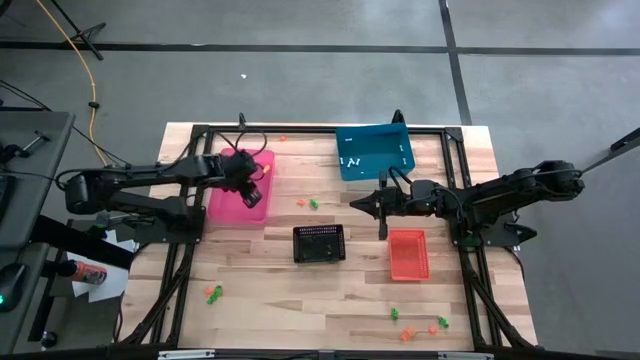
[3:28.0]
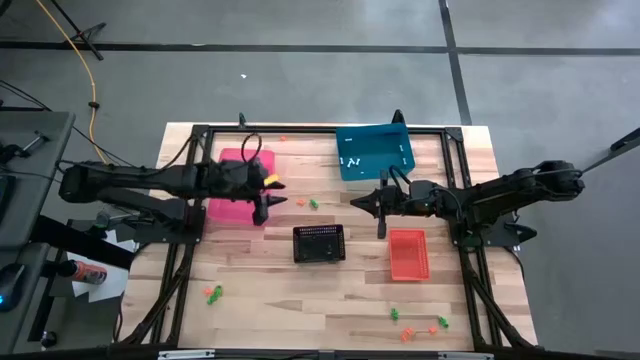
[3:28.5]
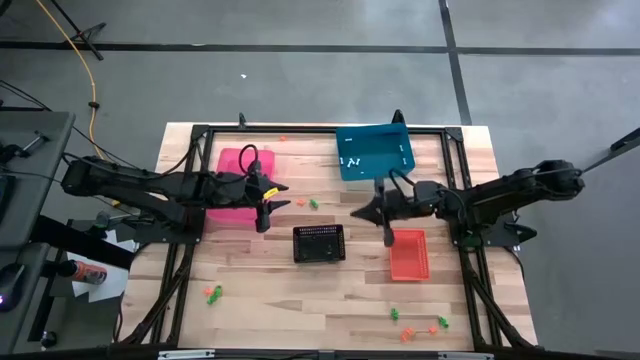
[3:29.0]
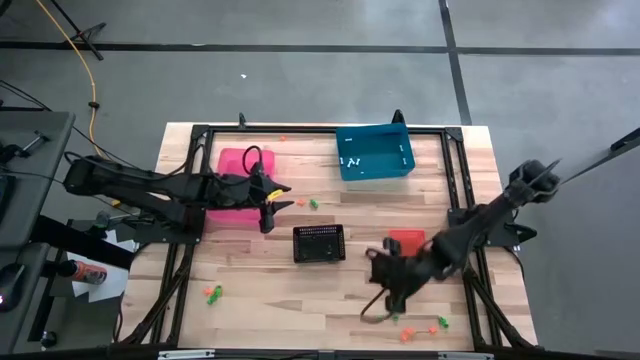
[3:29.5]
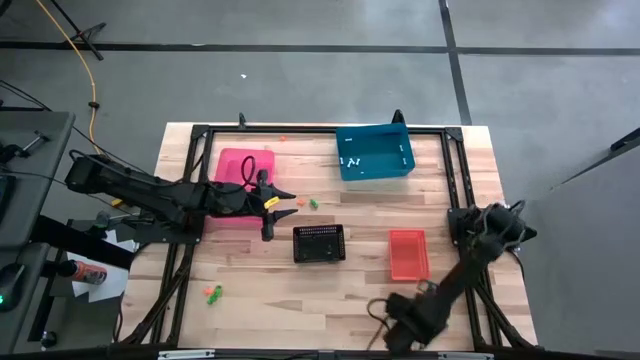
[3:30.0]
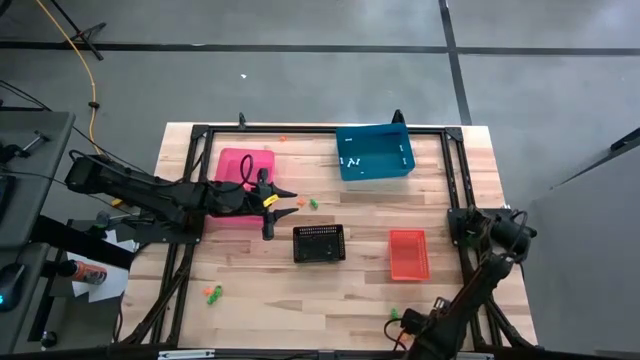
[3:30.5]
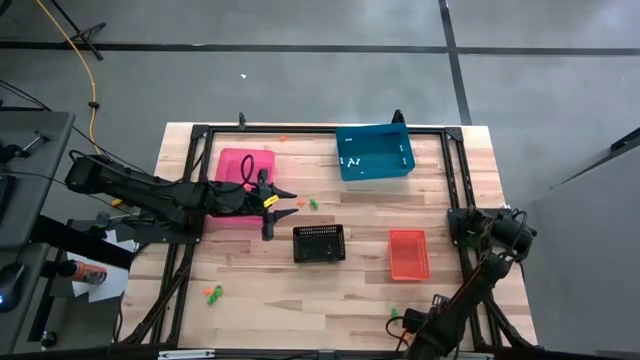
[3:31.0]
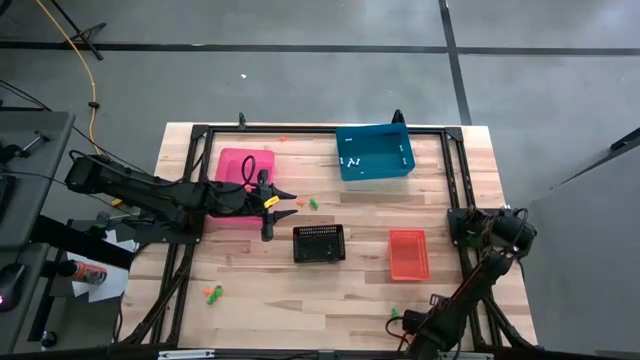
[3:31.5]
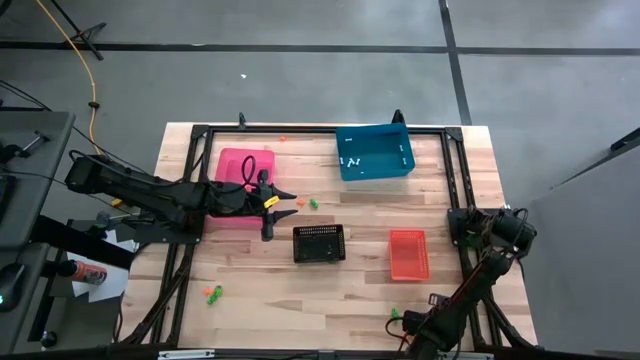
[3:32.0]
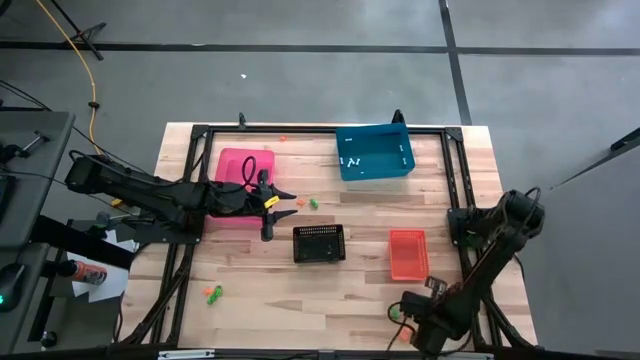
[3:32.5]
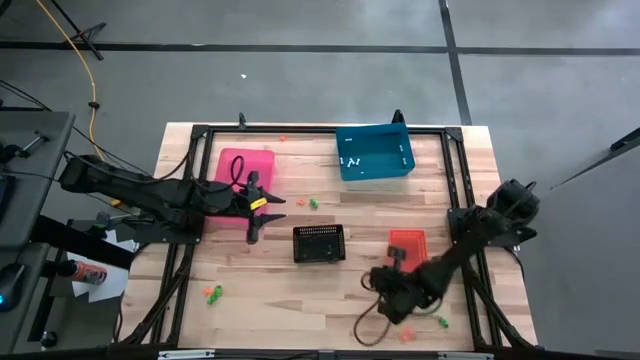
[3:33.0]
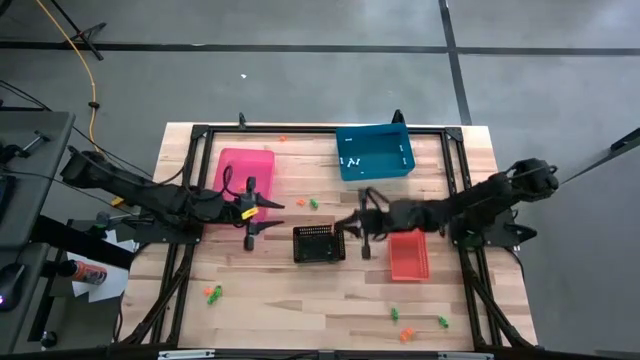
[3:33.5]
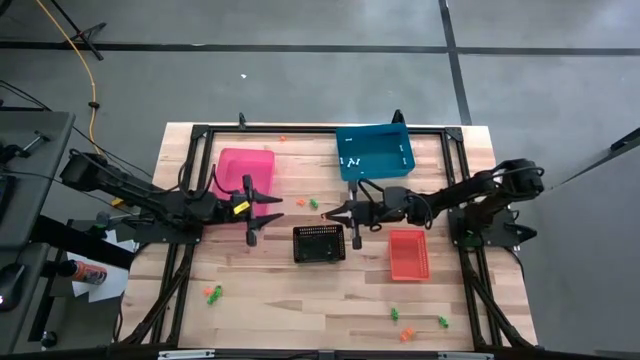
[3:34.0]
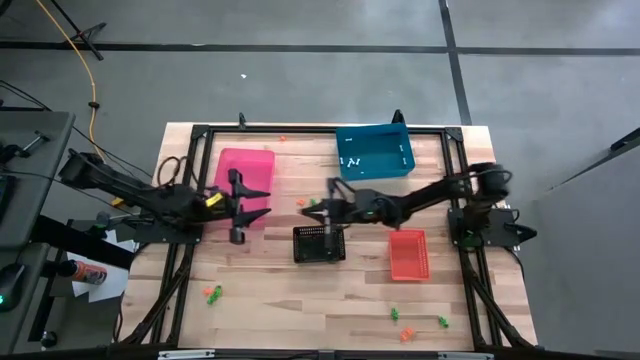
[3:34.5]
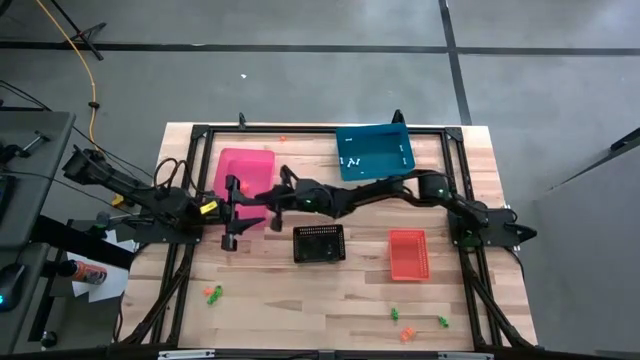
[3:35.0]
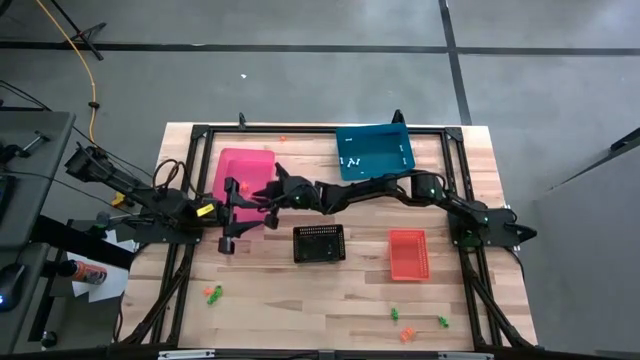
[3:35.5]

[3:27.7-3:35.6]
Task: Sort Halloween decoration
Put the orange spider toy into the pink bin

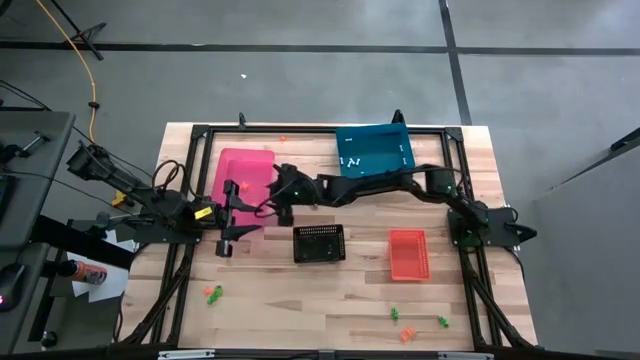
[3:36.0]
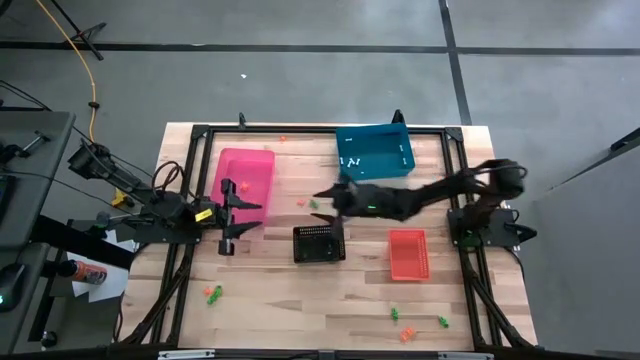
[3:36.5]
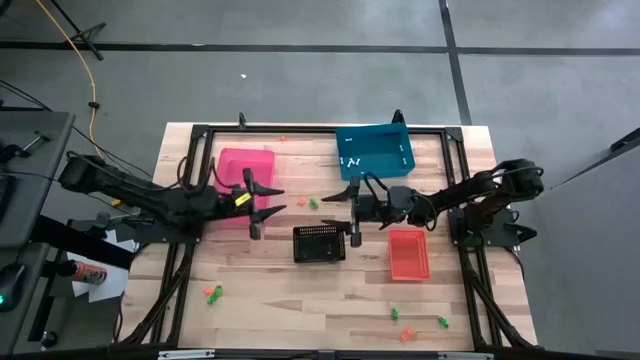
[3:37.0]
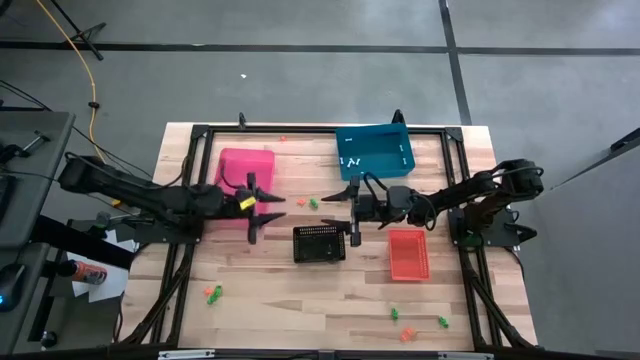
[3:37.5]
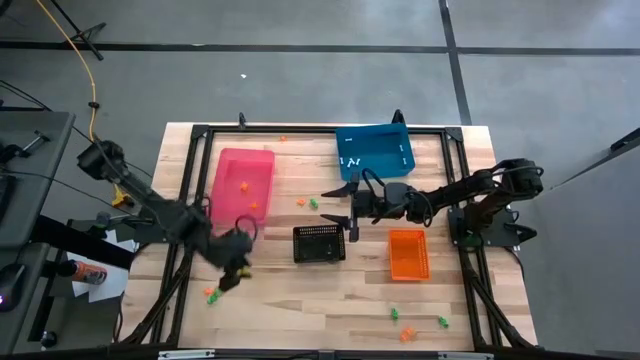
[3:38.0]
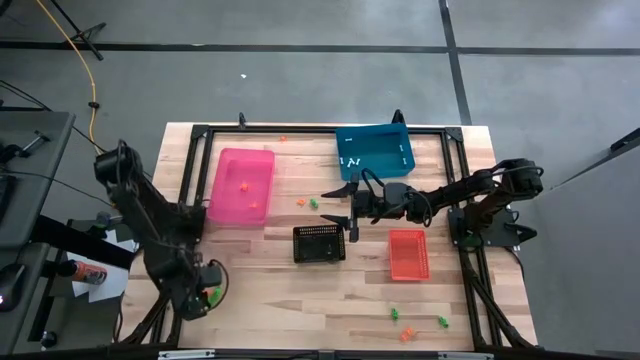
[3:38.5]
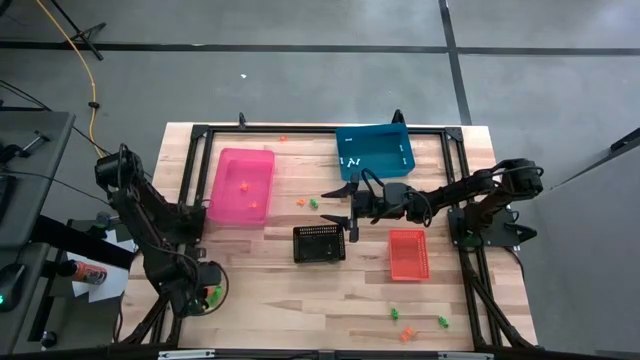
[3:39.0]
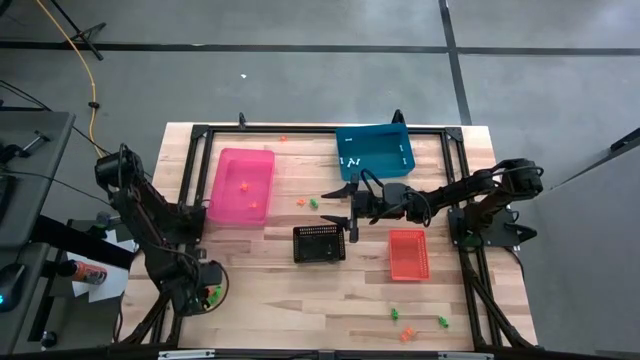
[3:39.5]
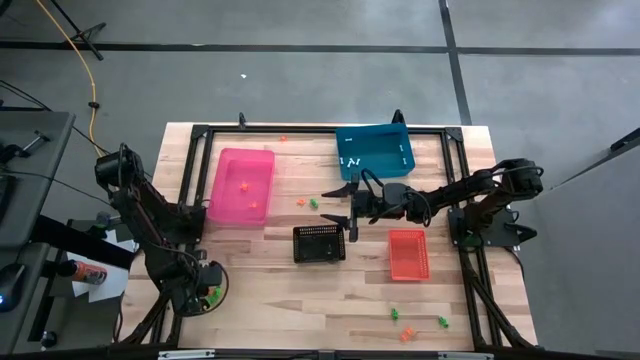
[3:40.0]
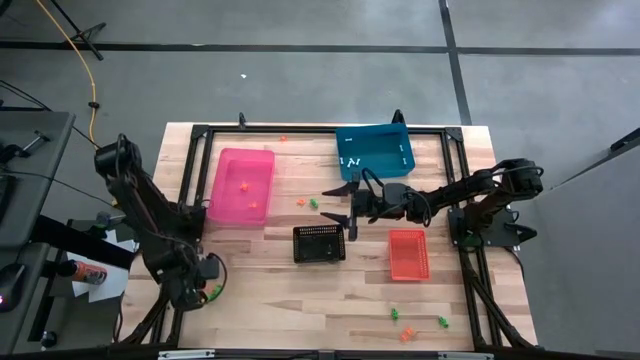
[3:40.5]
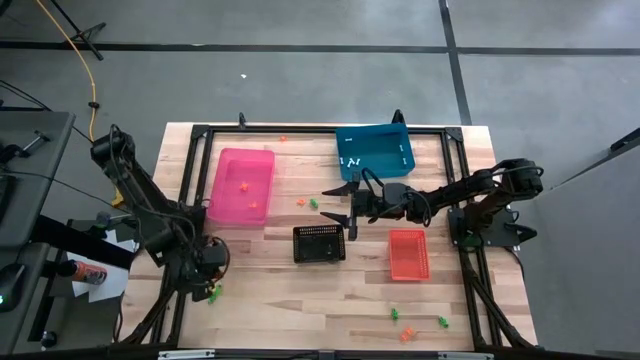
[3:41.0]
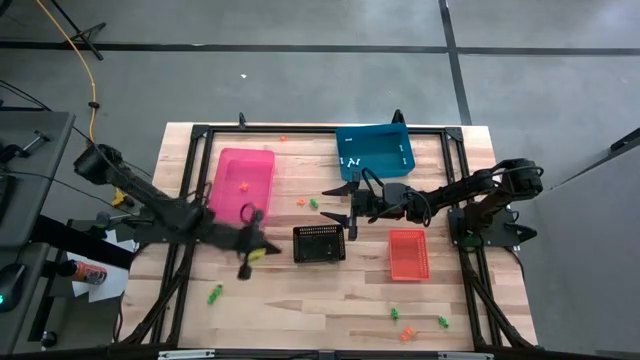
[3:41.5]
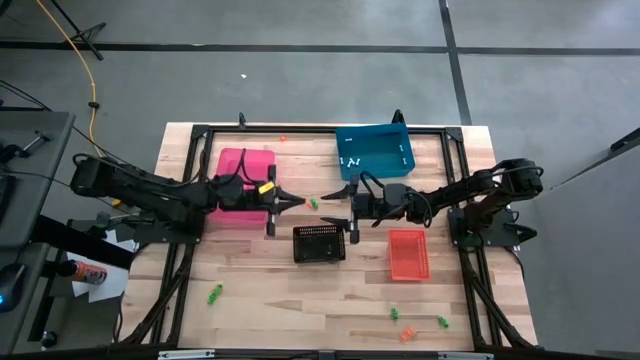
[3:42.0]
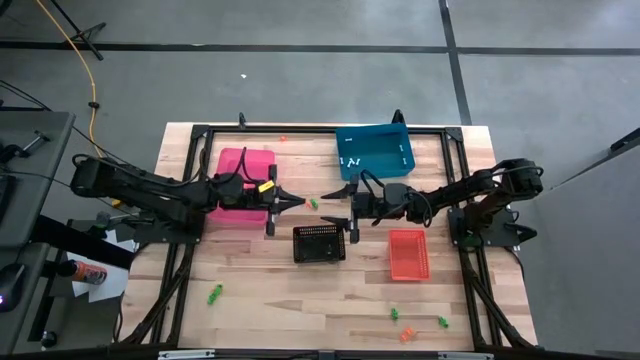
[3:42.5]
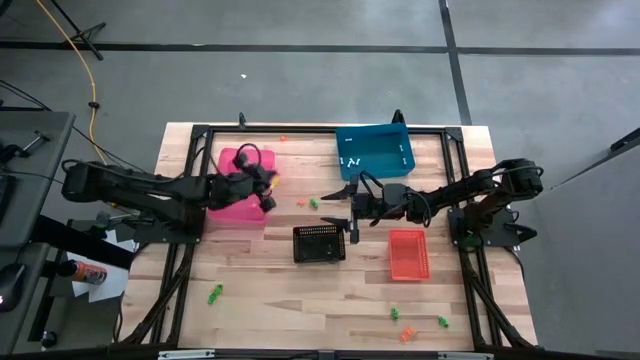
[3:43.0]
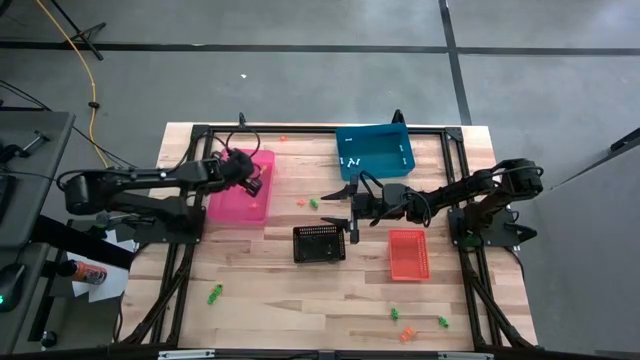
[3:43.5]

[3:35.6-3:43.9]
Put the orange spider toy into the pink bin

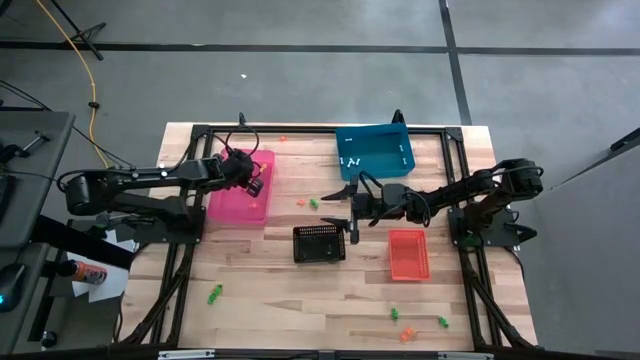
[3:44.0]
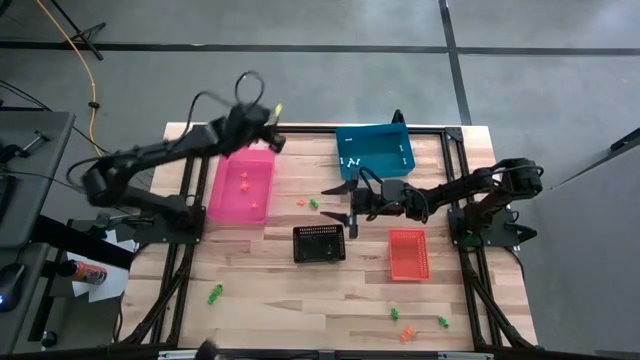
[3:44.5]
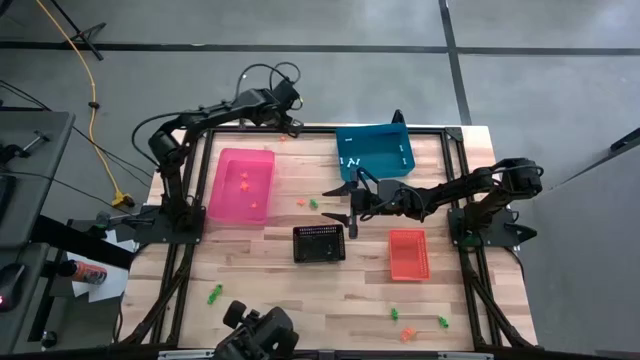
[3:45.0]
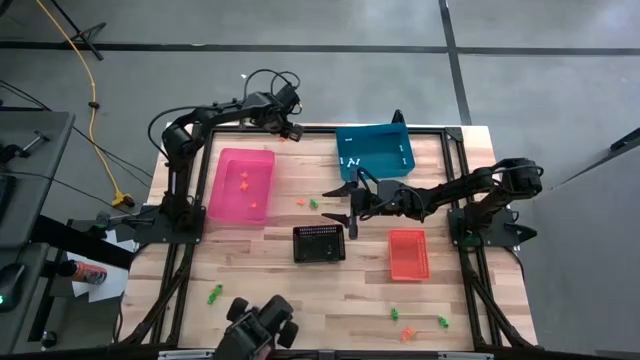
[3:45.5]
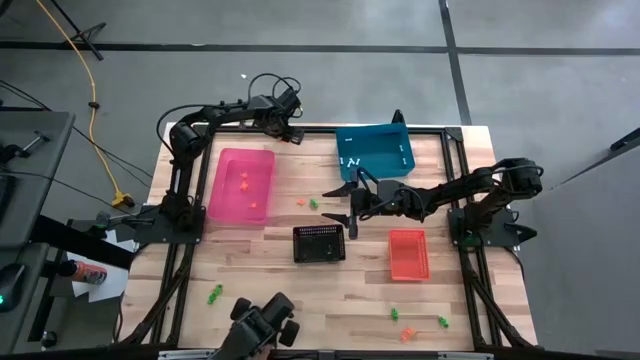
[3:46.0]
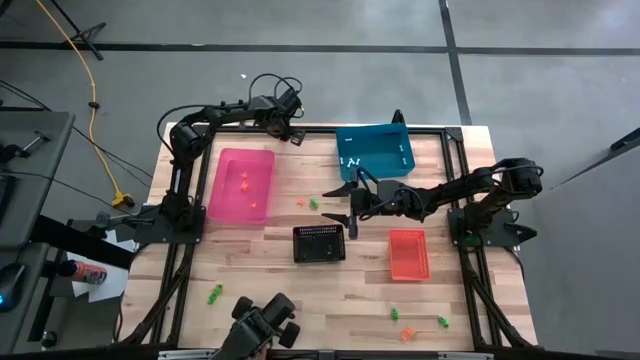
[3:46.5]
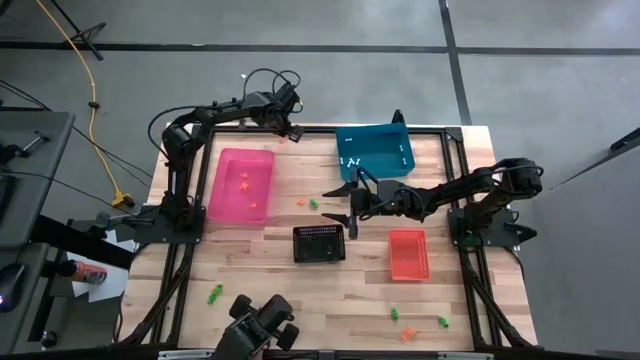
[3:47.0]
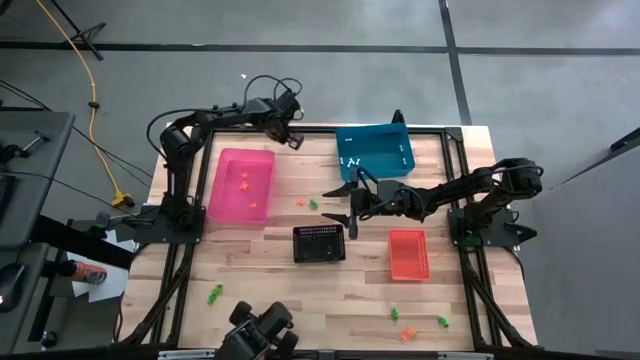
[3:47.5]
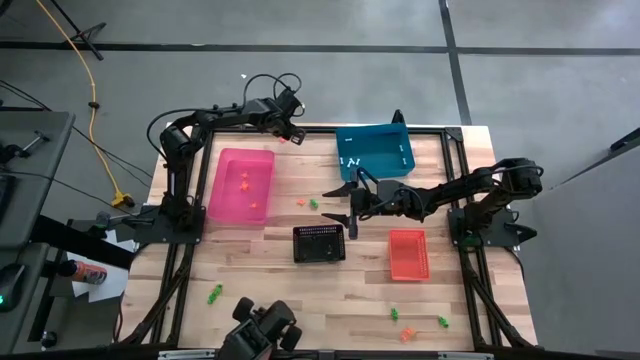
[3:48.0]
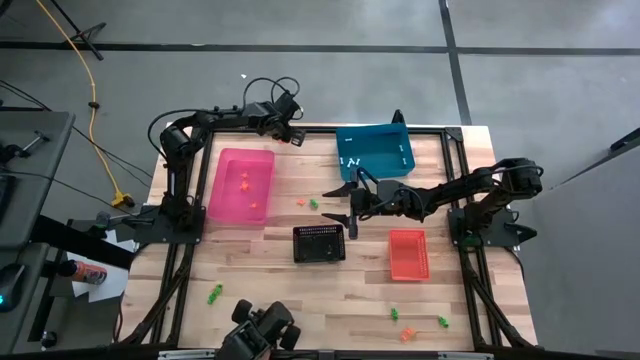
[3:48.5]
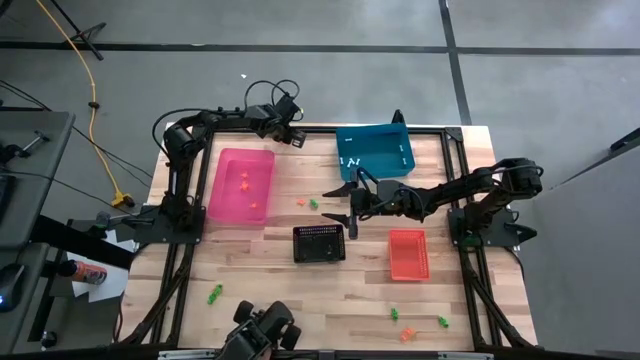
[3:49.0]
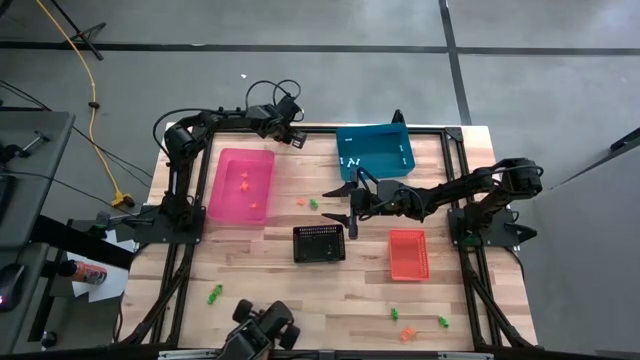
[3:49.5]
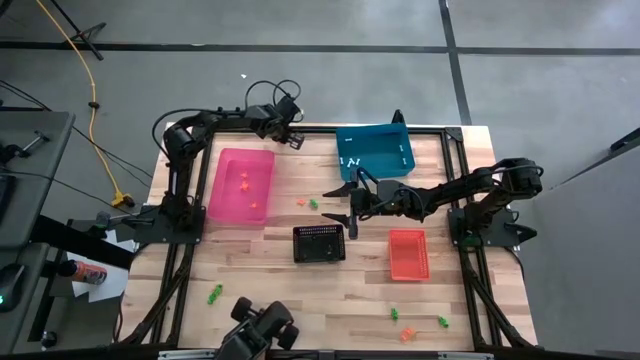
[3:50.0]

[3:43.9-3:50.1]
Put the orange spider toy into the pink bin

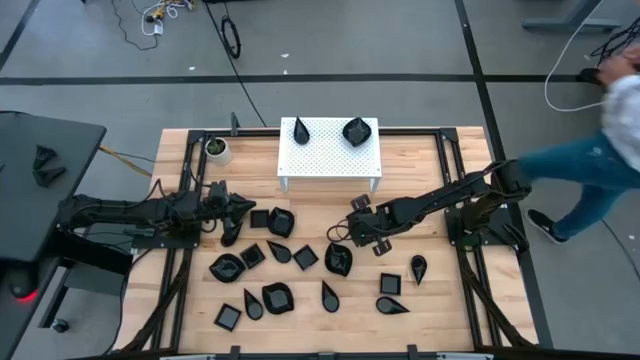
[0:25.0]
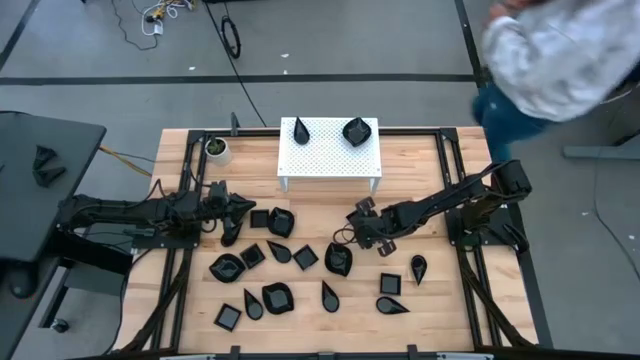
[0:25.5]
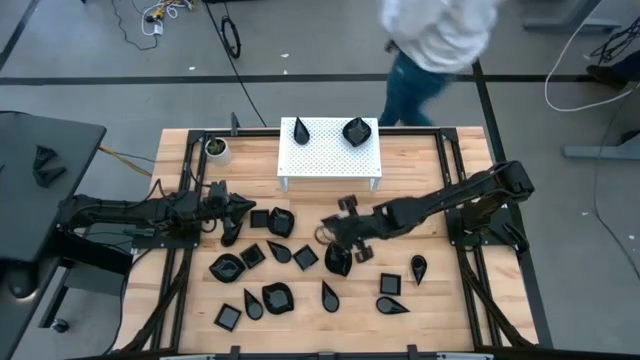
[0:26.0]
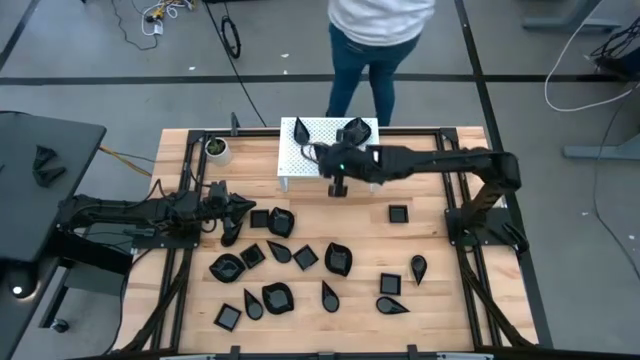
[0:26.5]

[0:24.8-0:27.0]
Task: Pick & Place Mini shaped plates
Put the black square plate on the shelf
